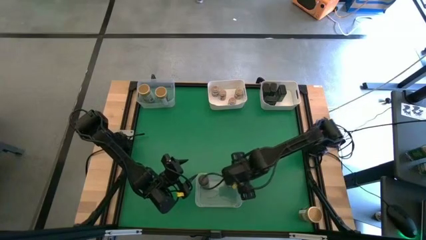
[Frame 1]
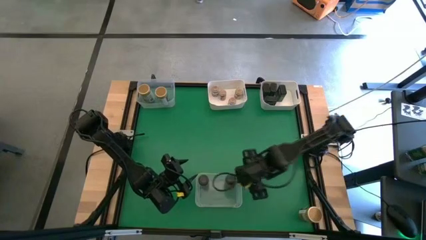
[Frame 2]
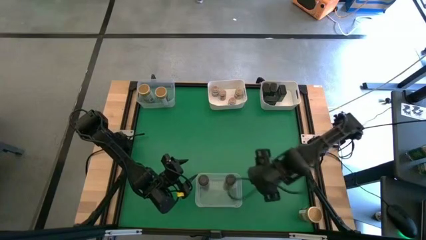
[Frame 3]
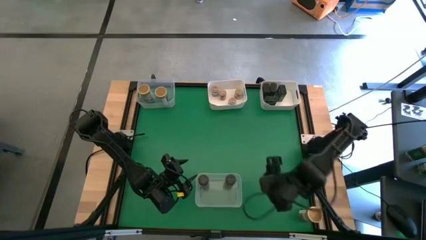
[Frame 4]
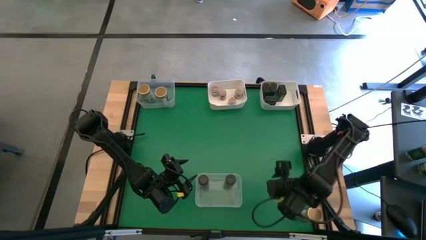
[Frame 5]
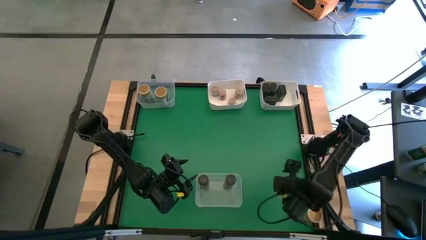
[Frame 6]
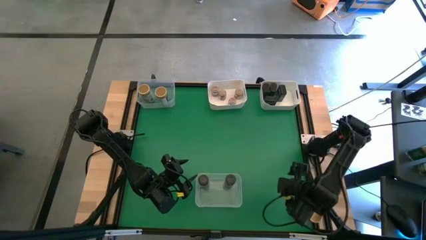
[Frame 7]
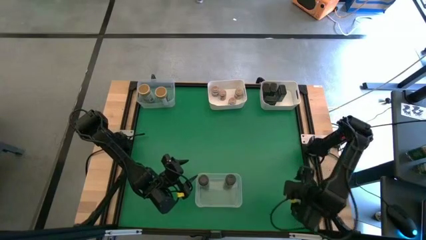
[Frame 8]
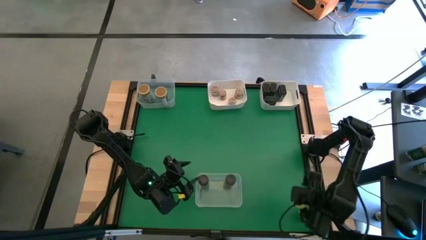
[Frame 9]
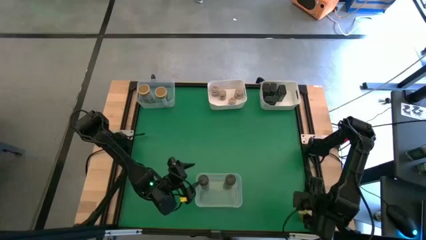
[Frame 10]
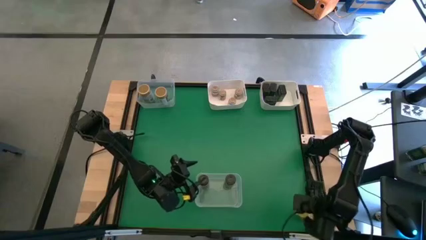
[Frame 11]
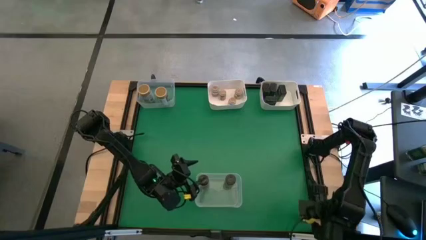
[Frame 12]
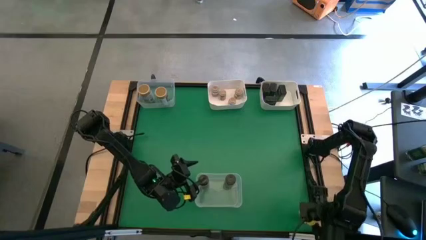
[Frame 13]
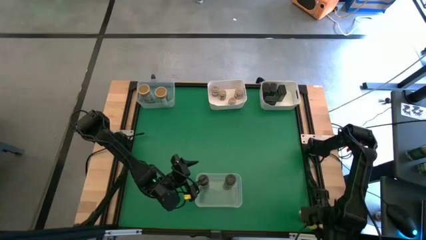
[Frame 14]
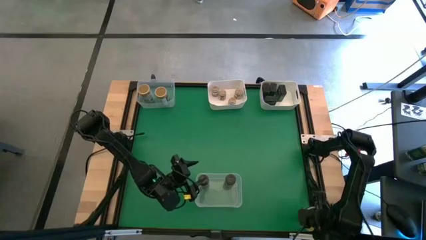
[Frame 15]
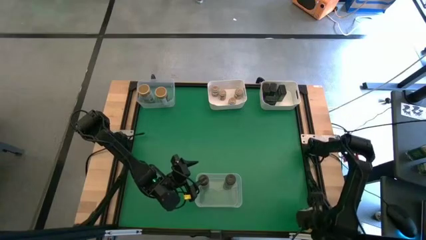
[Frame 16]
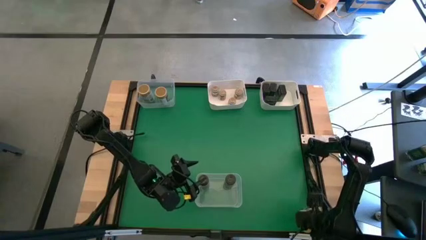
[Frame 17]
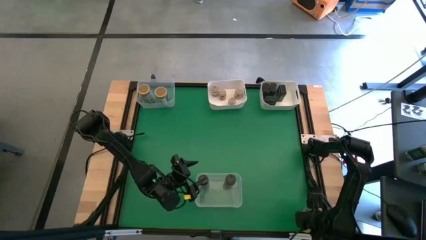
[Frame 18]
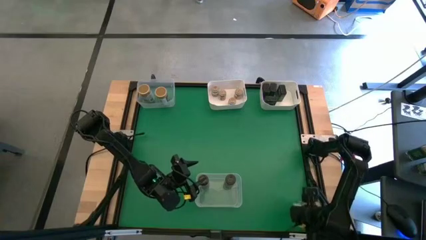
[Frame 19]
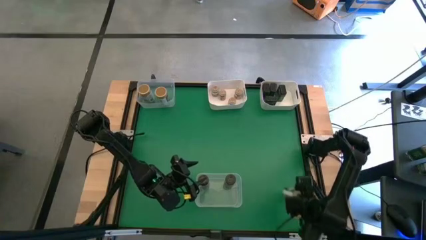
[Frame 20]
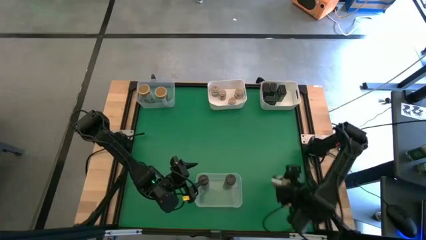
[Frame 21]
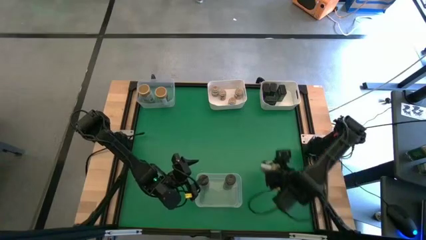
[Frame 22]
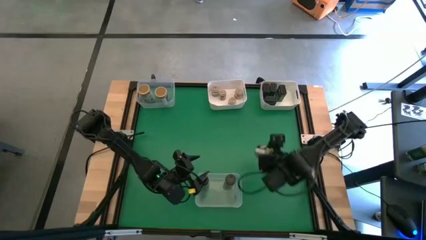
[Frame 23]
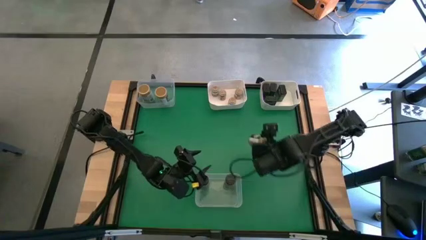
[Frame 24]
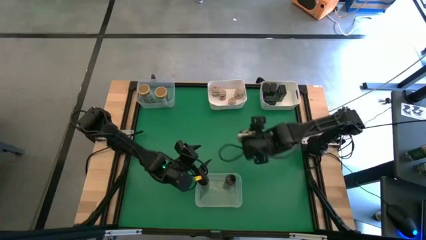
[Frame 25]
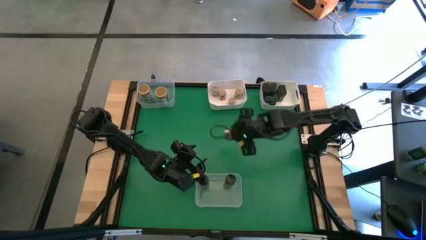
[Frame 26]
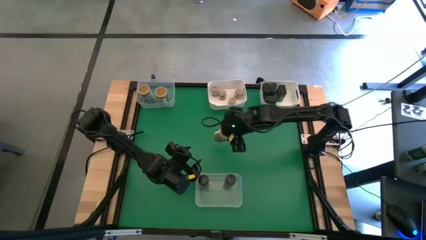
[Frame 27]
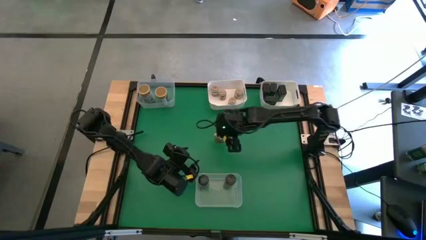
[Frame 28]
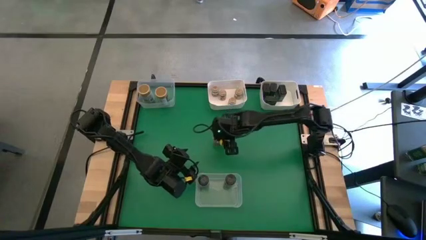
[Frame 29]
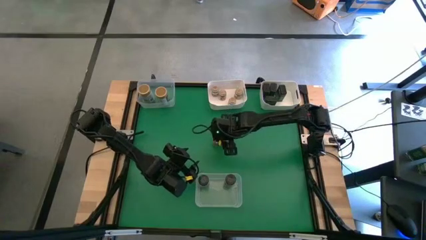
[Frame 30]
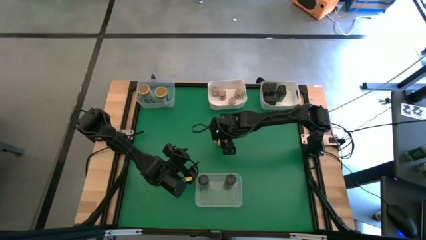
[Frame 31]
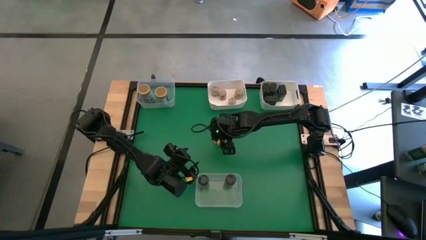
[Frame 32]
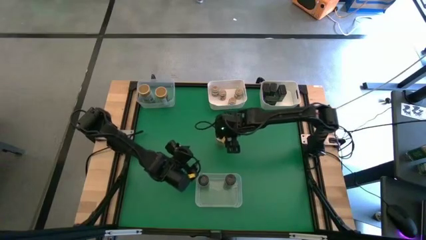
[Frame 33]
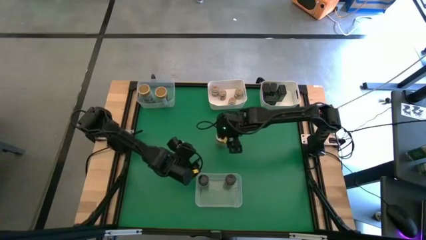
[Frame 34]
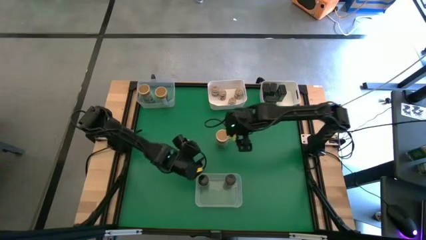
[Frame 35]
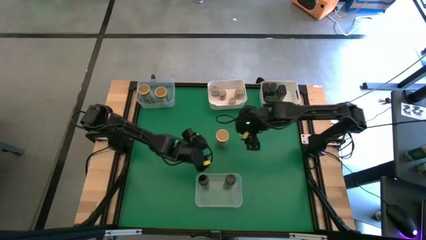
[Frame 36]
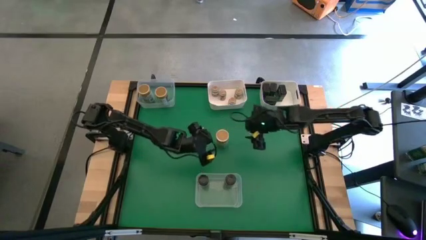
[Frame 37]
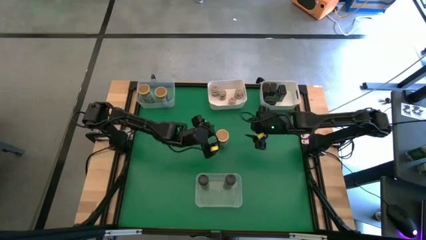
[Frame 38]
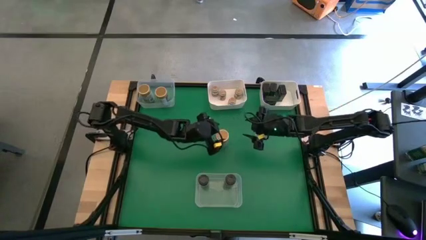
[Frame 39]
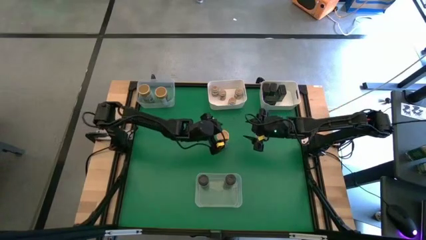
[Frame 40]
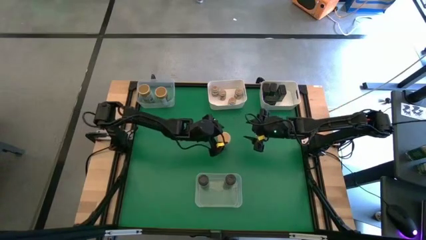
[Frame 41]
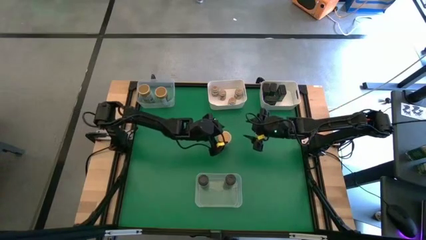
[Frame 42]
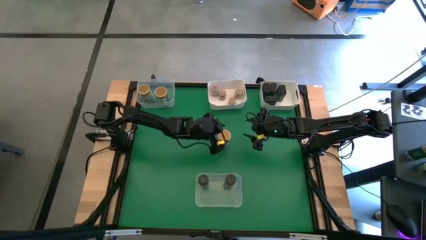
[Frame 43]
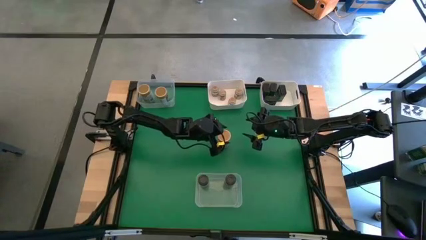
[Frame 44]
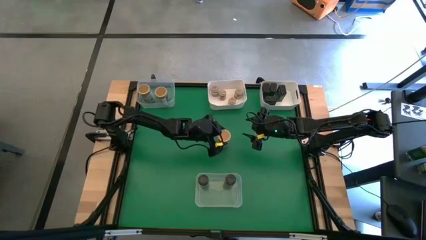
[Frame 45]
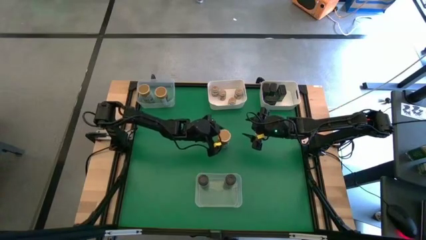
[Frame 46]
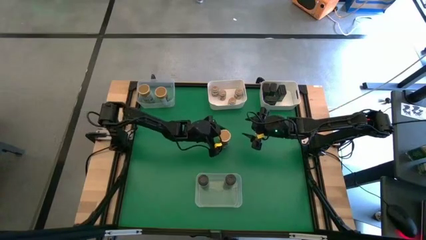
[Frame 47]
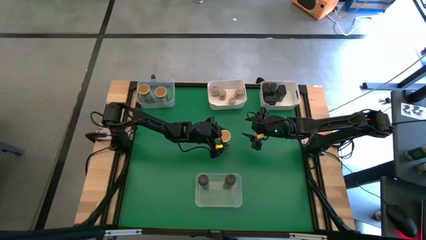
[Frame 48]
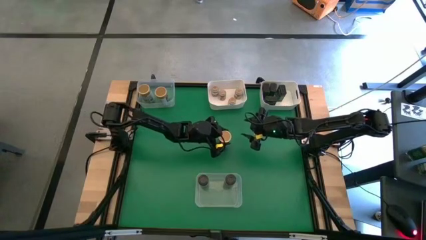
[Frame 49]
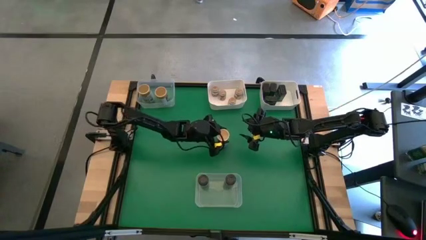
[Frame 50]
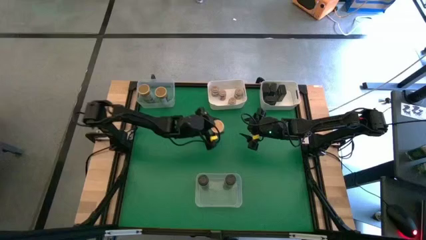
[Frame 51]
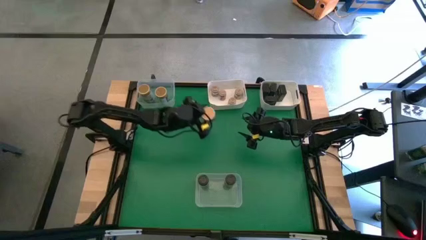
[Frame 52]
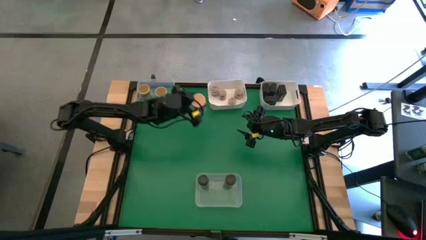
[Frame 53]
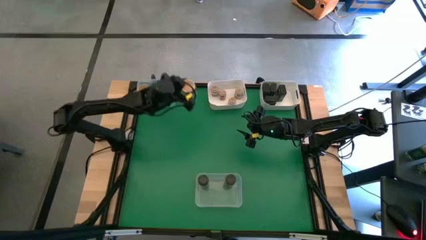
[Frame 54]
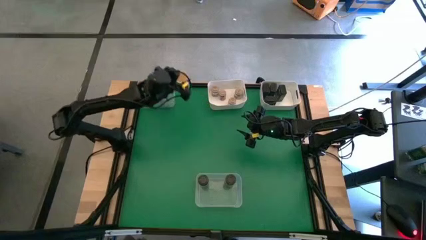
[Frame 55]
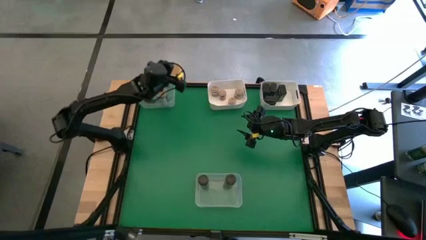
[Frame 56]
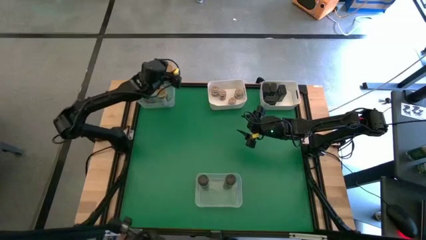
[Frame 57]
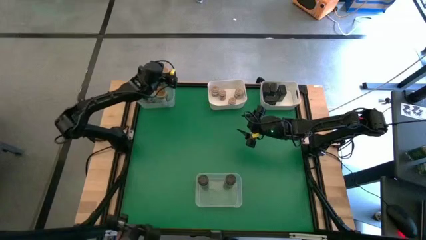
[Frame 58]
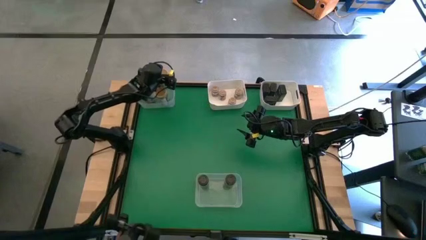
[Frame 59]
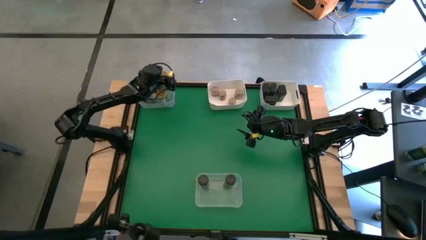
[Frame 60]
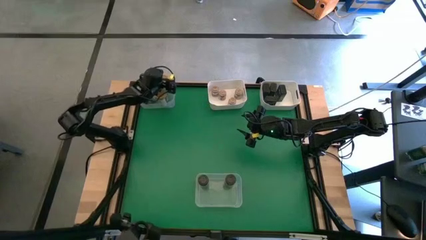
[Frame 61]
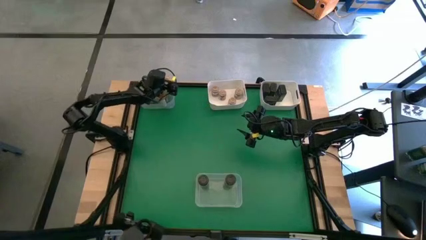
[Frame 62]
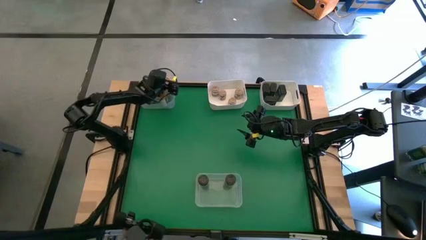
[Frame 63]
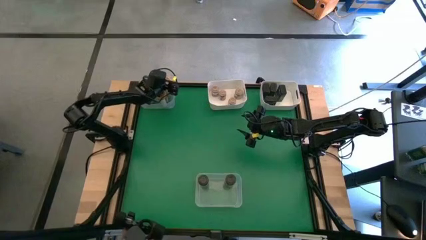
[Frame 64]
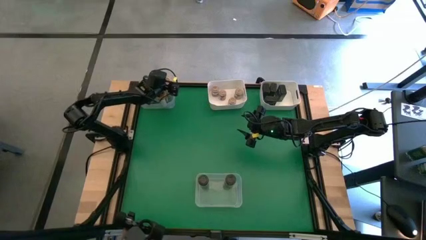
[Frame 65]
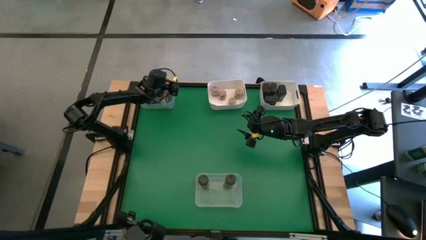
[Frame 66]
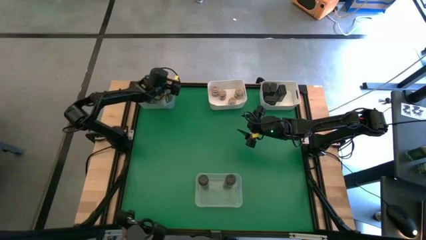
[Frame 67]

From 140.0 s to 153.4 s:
Task: Sort spices by type
Put the gold seasoning bottle into the top transparent bin

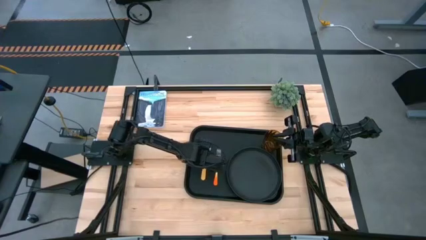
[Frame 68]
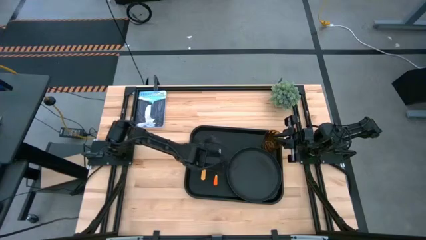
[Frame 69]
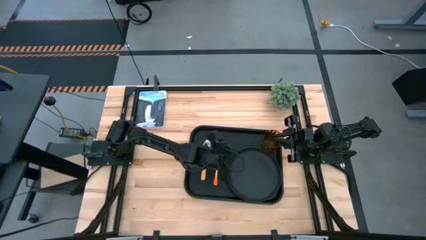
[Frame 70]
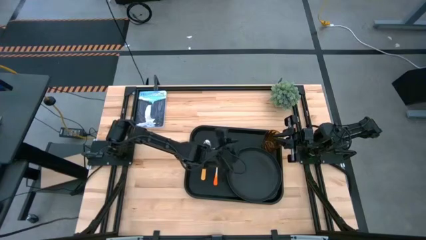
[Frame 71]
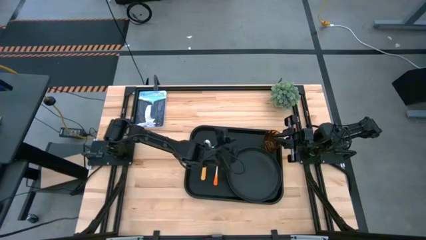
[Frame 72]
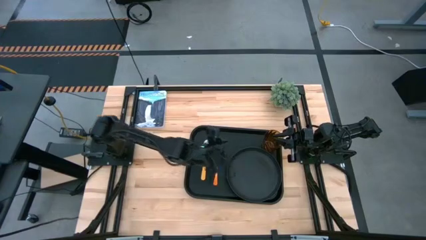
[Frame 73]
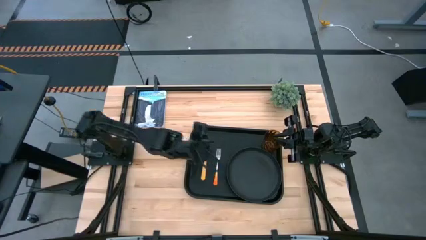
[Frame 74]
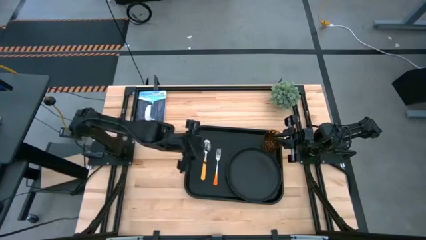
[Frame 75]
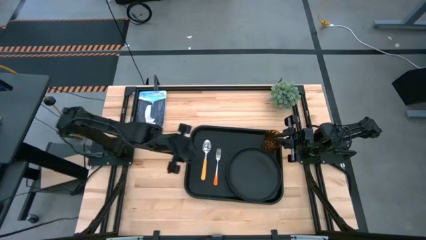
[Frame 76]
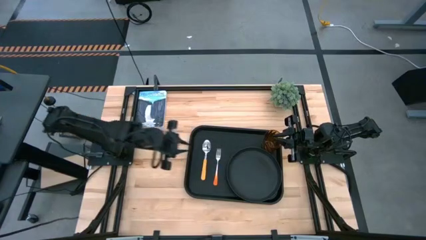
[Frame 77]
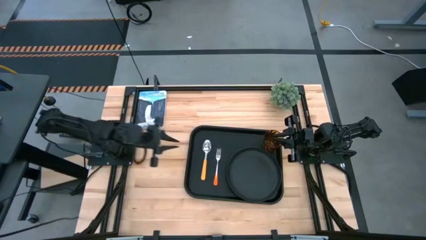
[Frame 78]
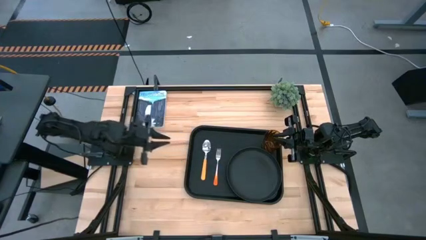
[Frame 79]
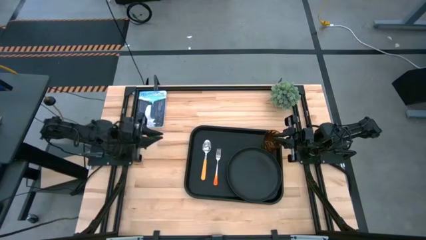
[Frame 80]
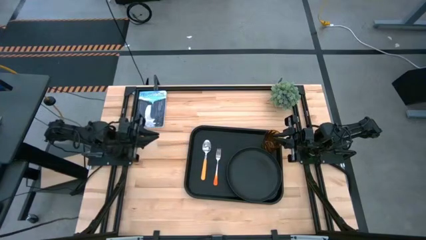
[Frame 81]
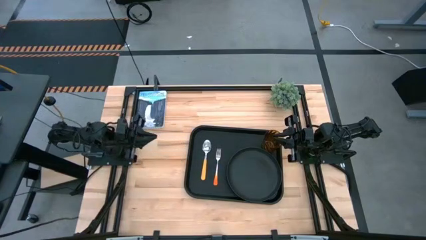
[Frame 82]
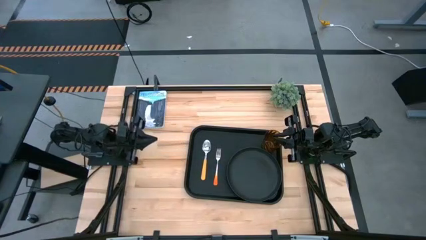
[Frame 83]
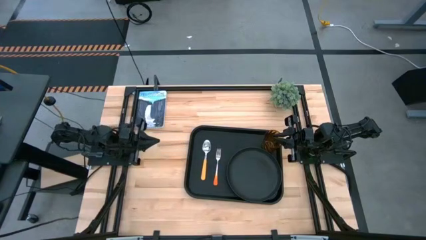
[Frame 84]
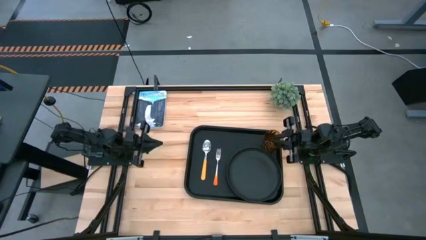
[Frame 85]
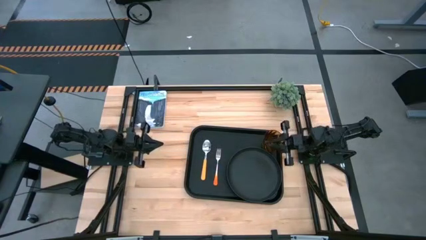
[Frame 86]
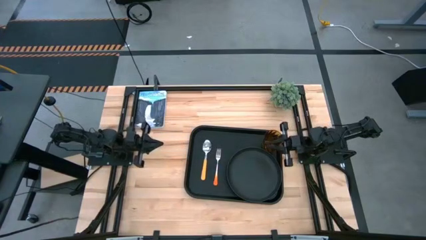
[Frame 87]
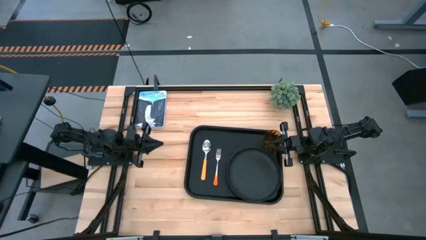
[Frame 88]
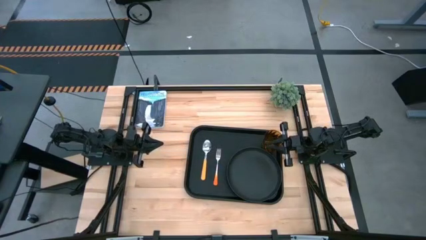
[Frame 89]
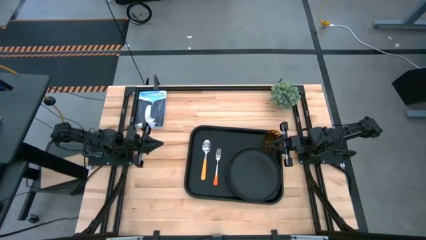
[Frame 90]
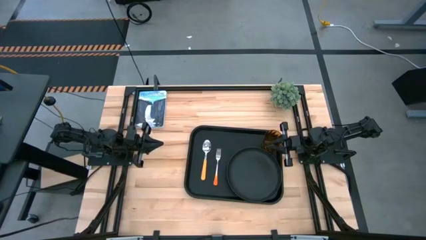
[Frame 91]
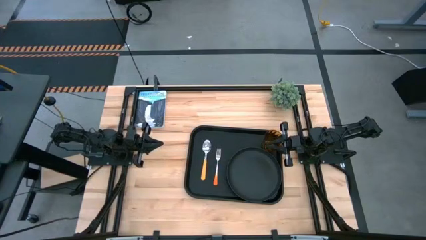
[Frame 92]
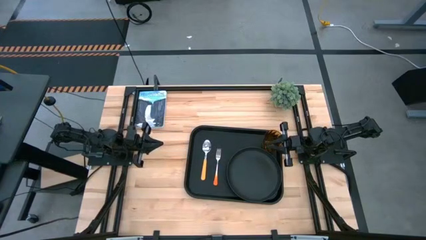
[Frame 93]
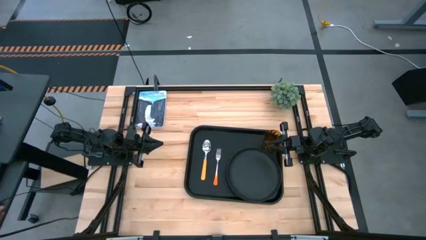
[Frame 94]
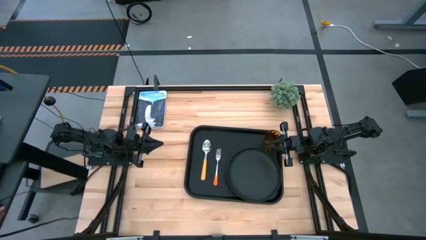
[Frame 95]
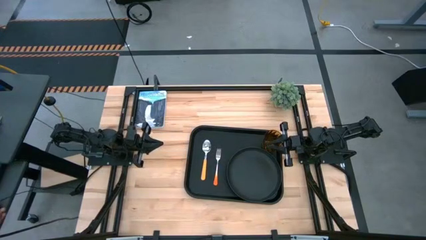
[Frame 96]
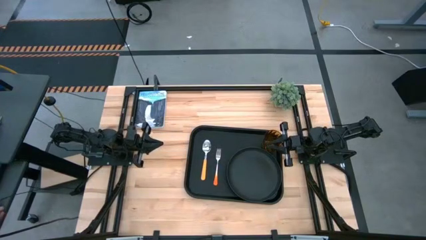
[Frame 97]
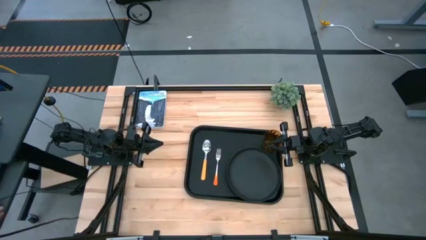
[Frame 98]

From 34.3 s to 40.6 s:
Task: Pick and place plate/cup/fork/spoon on tray
Return to Home Position
